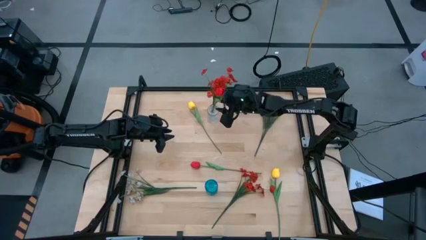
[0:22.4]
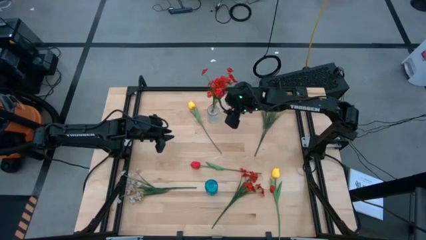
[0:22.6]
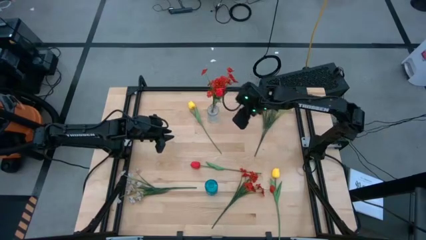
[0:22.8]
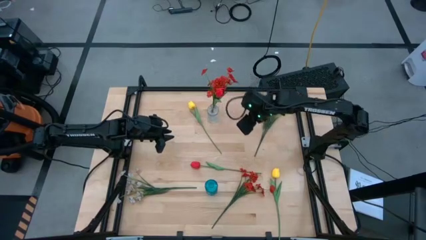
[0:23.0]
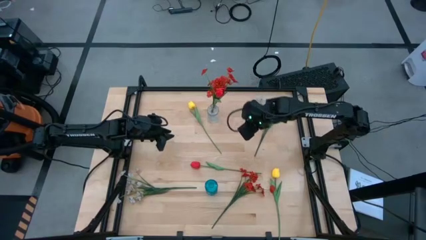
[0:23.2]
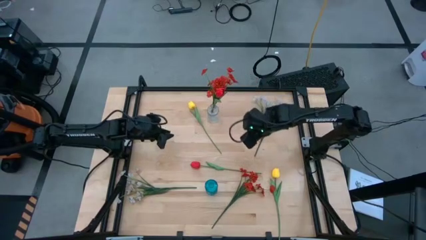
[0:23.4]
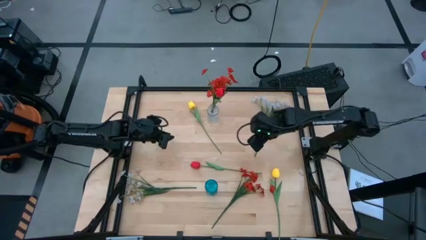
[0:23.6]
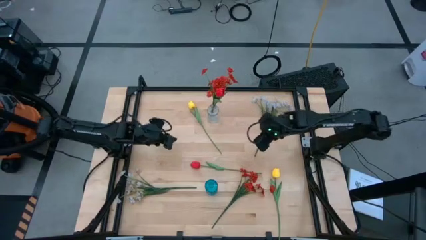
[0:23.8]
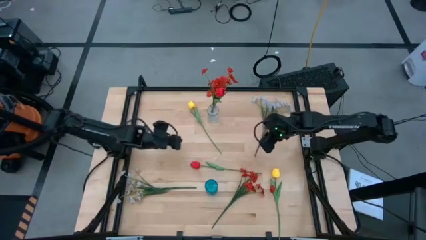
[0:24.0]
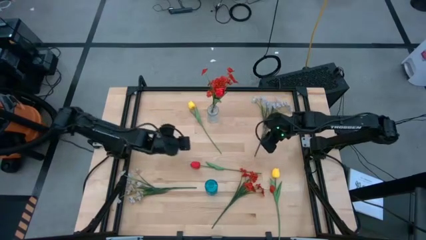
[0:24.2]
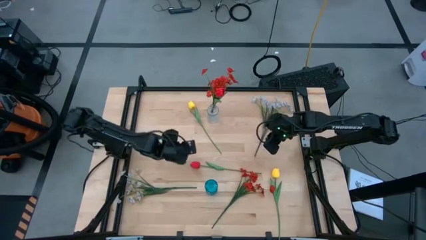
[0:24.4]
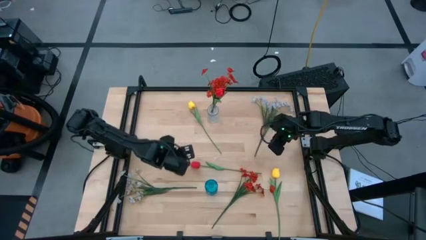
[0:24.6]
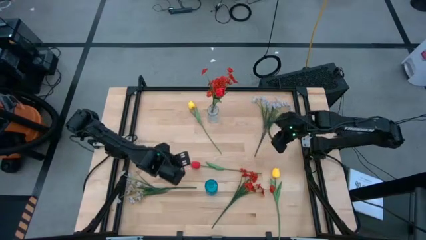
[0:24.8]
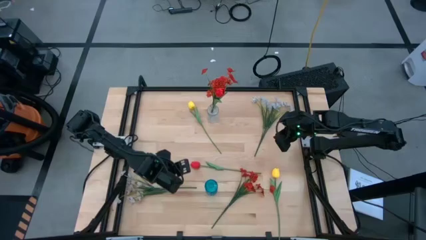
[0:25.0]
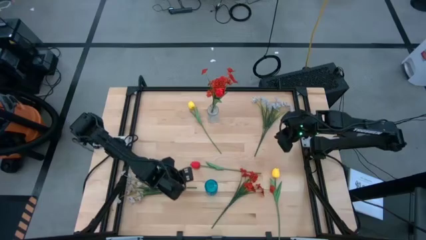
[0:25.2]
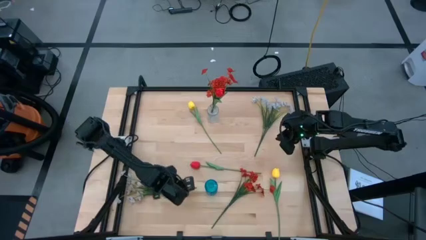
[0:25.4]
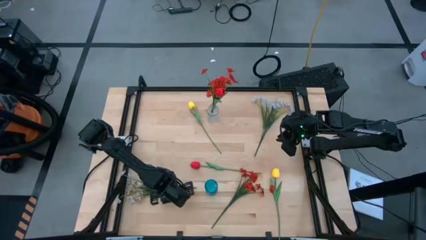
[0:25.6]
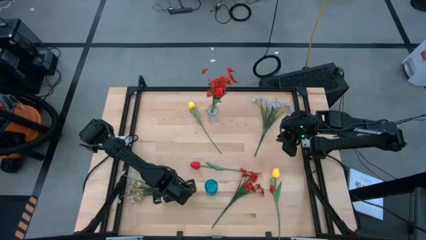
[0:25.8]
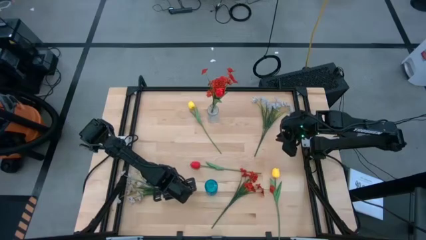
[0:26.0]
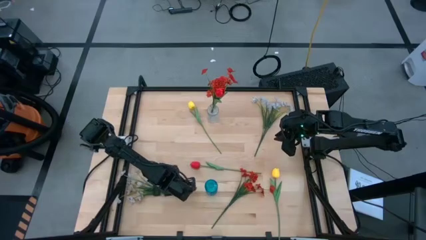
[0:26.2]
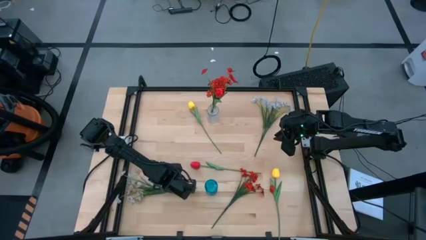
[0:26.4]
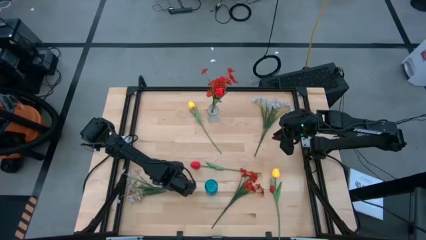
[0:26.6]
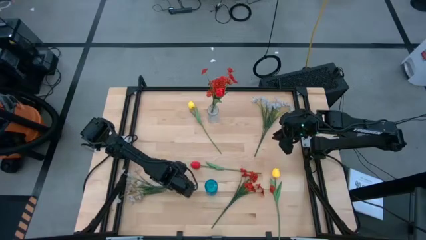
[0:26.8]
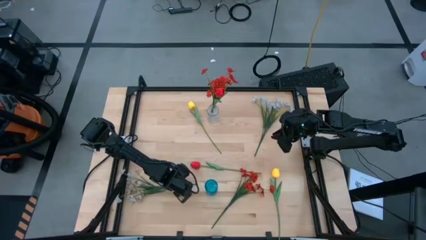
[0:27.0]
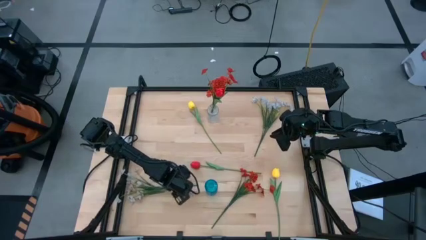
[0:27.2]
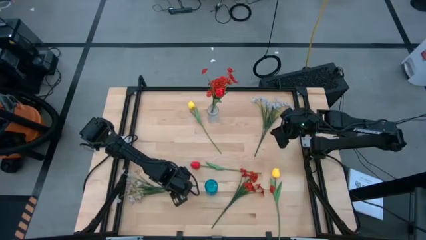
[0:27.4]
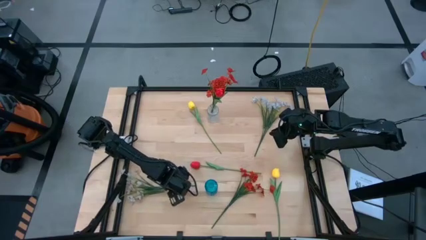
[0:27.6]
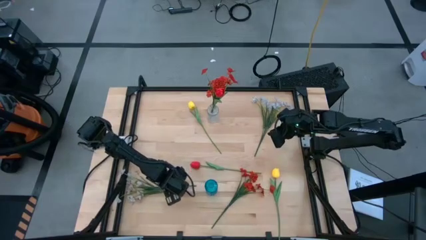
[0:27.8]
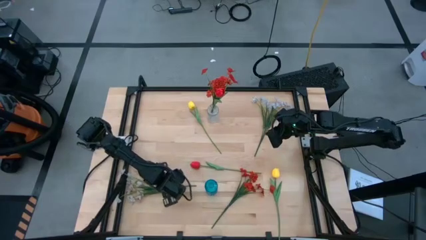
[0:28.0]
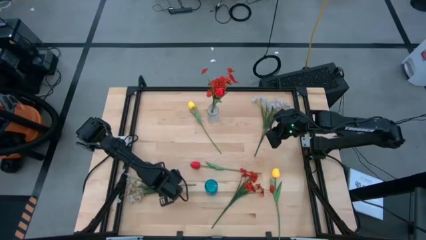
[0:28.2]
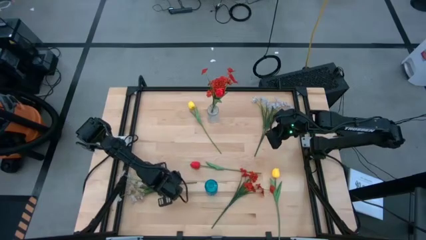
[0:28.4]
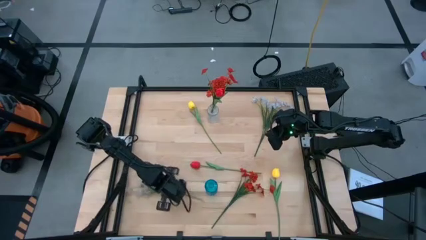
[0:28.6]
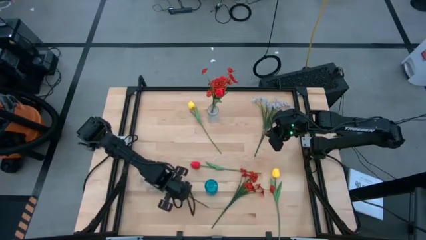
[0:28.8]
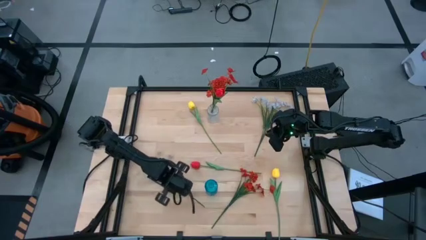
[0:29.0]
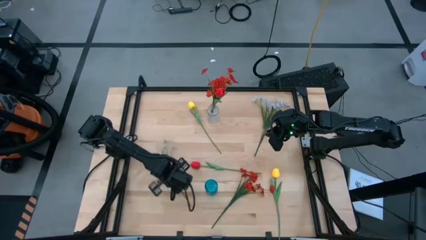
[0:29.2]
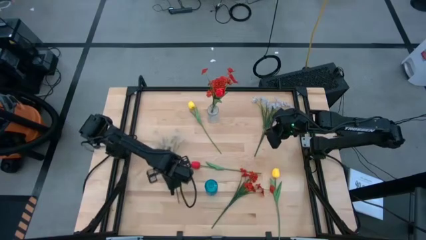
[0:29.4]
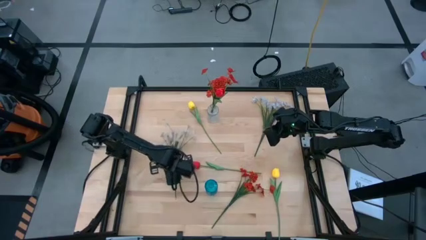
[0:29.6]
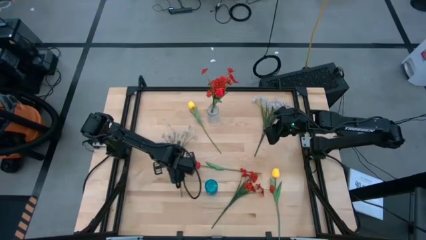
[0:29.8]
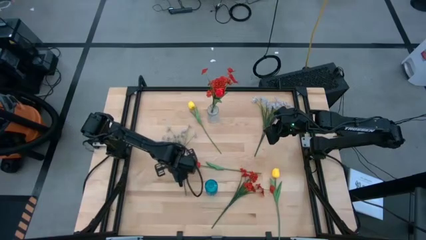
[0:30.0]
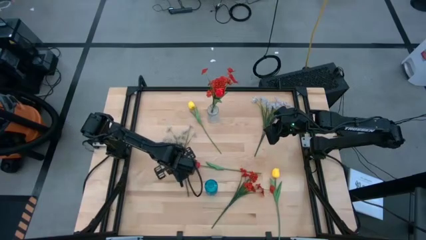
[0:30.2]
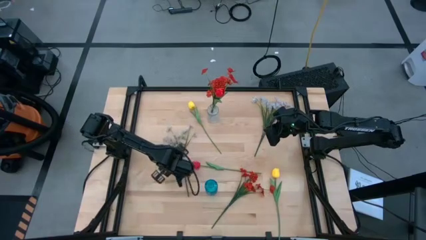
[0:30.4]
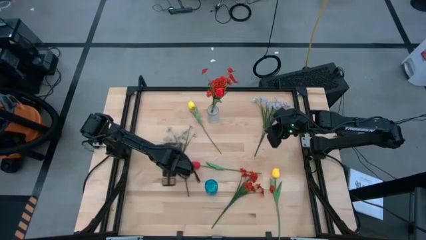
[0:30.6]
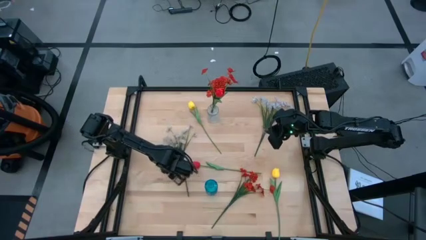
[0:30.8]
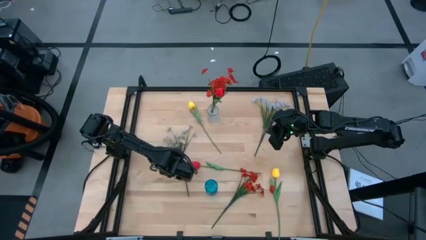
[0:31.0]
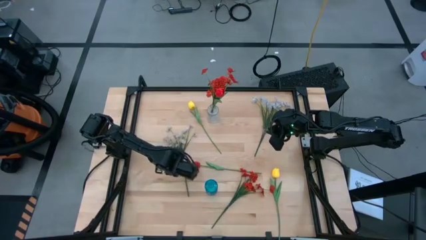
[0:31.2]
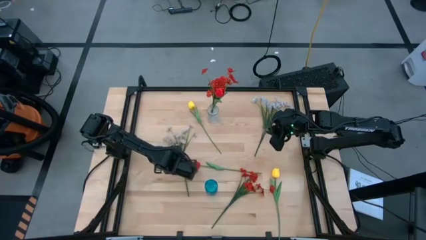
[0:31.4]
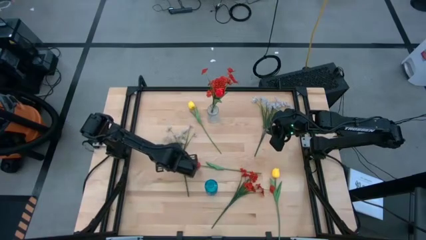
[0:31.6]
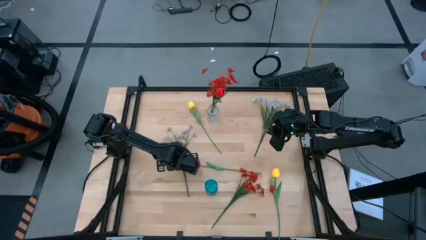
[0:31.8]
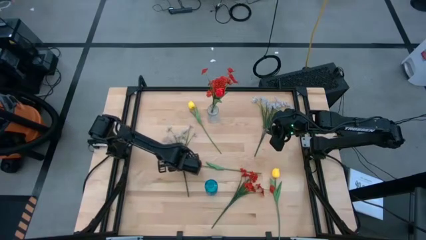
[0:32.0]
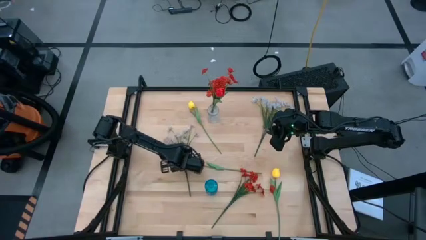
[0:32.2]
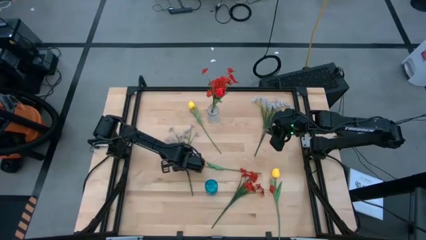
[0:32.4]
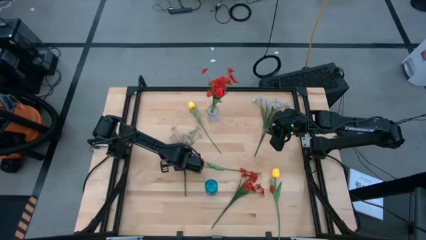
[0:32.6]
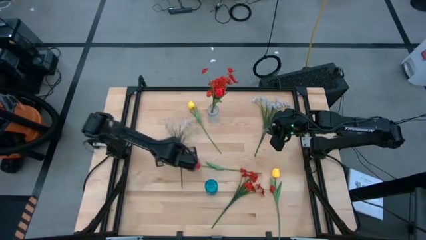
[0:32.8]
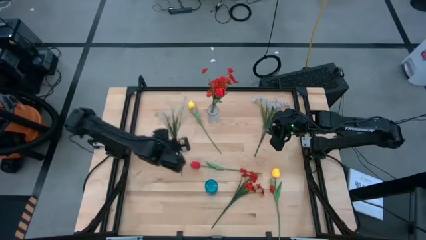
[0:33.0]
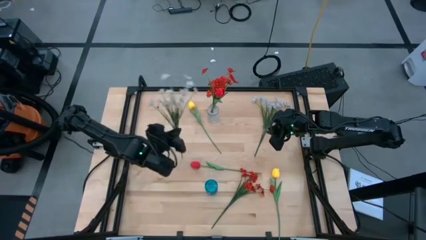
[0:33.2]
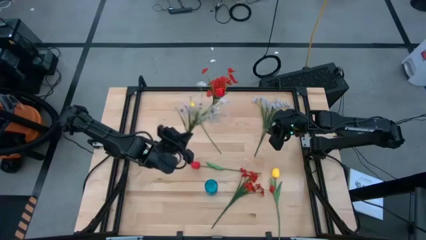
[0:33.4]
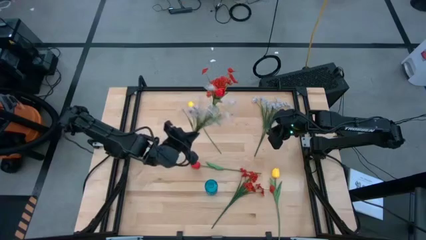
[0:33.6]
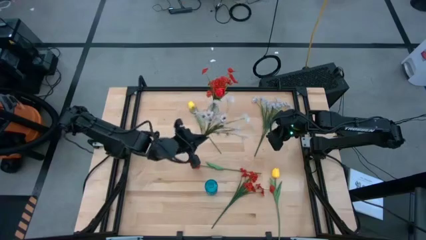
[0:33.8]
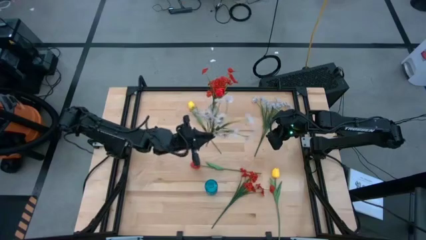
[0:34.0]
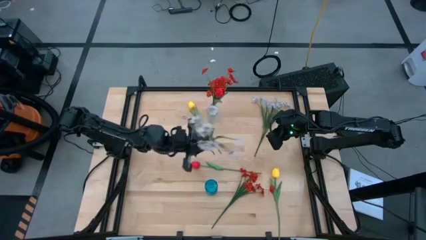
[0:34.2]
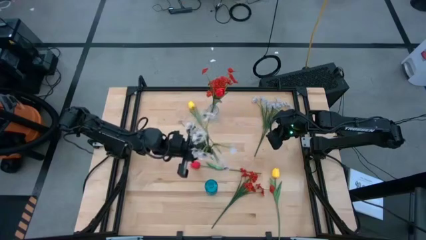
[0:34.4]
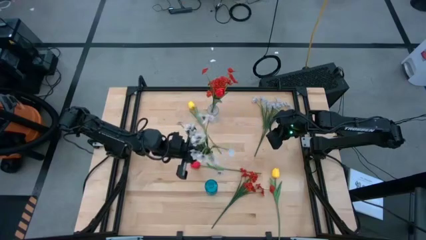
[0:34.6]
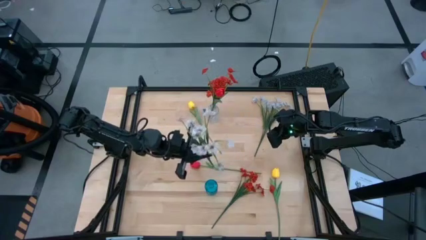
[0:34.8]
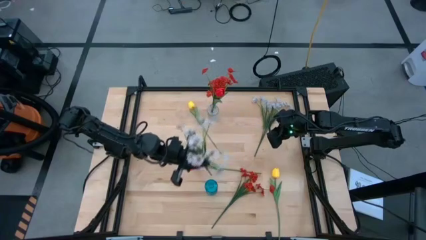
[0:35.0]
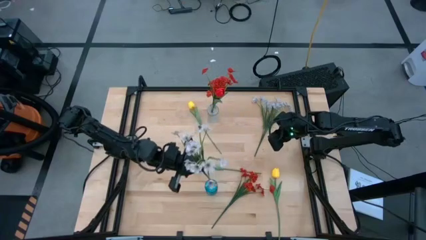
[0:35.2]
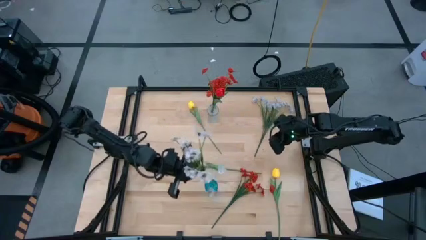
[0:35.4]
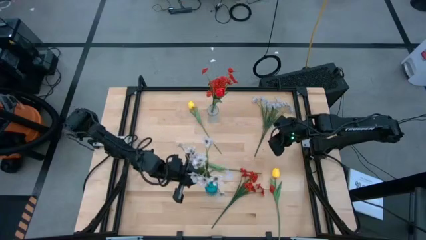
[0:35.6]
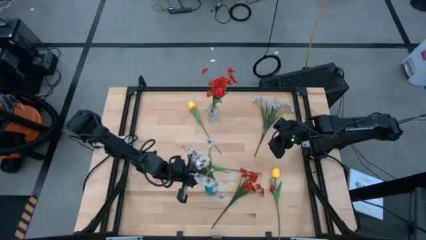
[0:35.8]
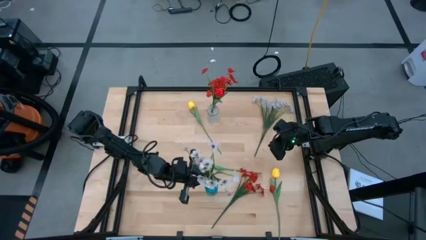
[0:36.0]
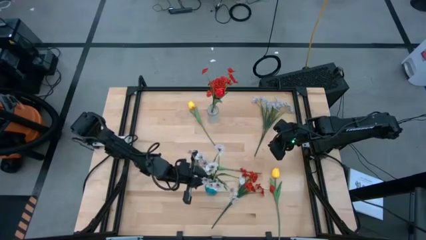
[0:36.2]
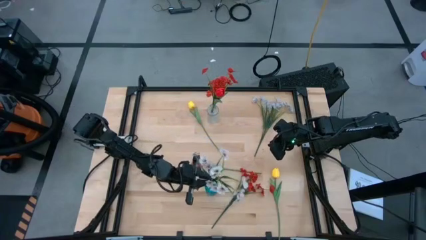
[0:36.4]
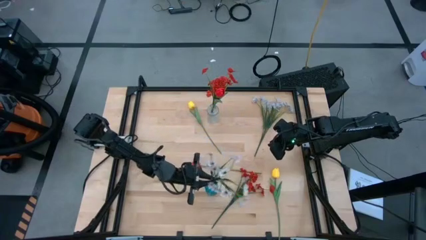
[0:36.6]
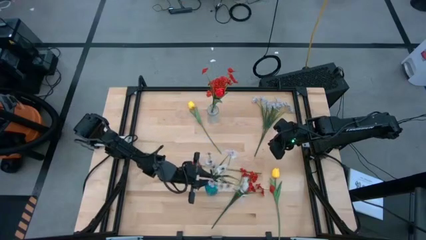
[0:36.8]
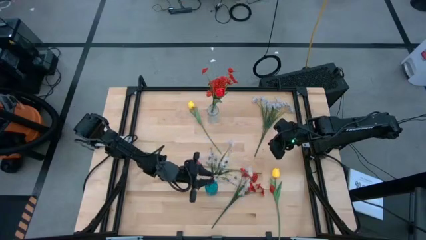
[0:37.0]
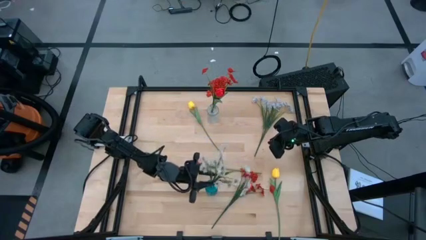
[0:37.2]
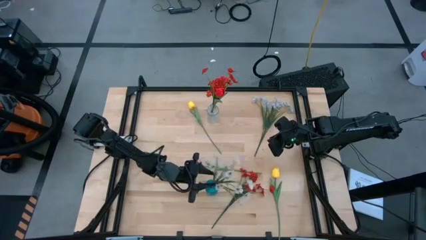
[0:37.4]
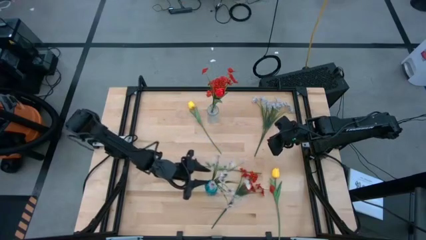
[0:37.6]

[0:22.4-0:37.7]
Task: Sort flowers into vase by color
Put the bottom white flowers into the blue vase
